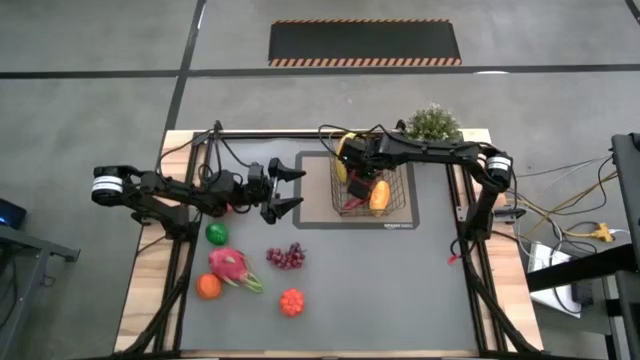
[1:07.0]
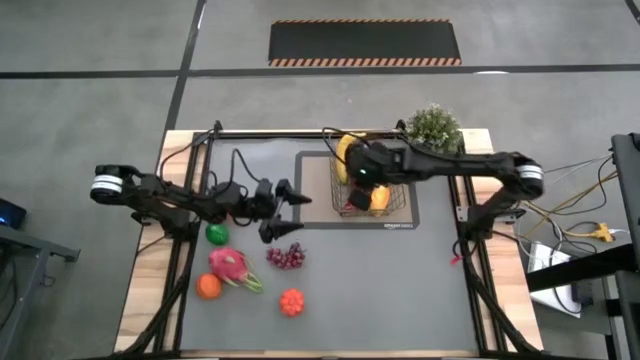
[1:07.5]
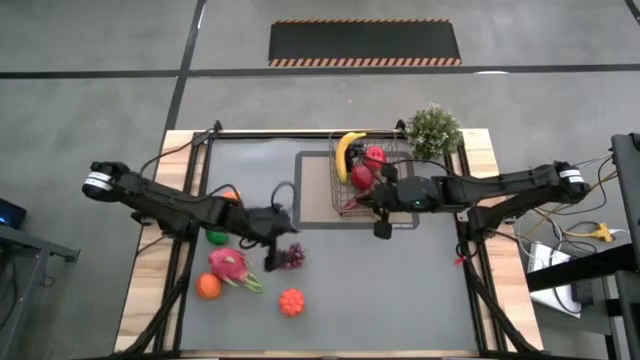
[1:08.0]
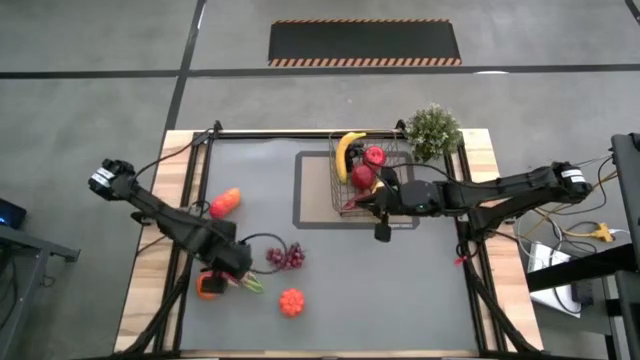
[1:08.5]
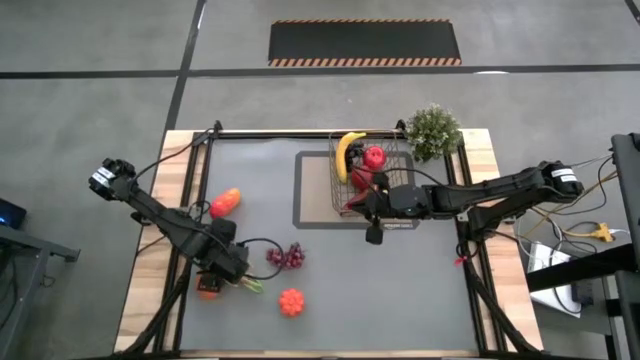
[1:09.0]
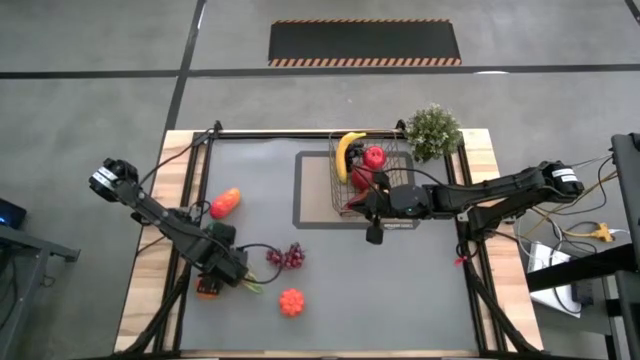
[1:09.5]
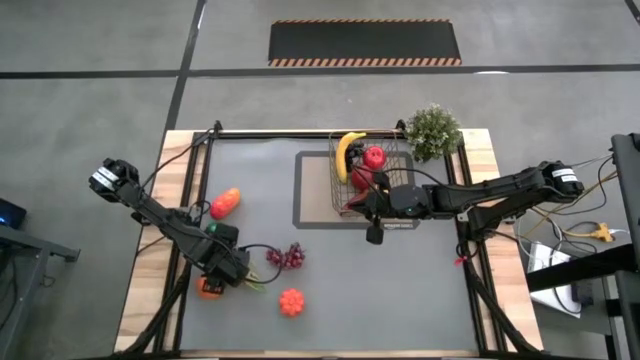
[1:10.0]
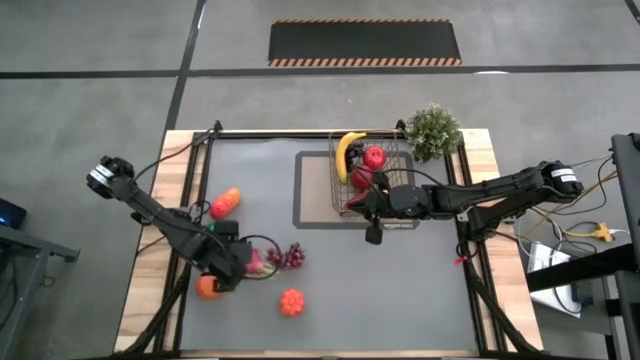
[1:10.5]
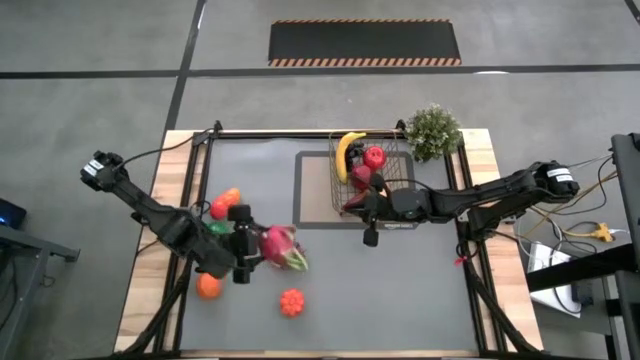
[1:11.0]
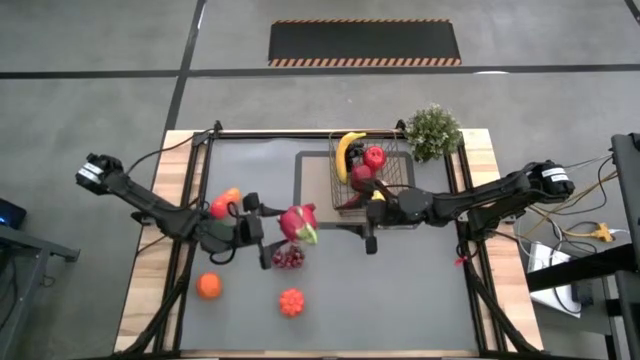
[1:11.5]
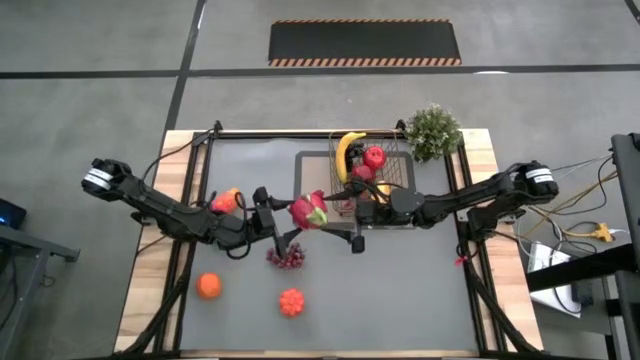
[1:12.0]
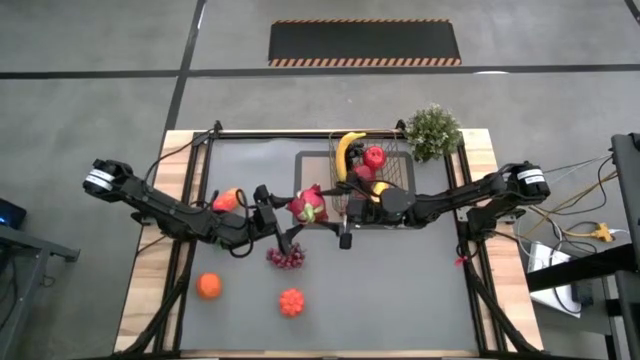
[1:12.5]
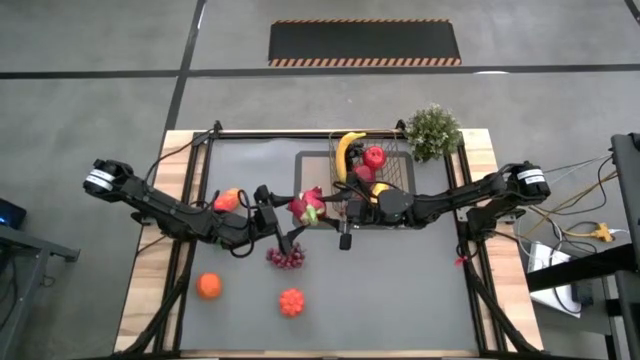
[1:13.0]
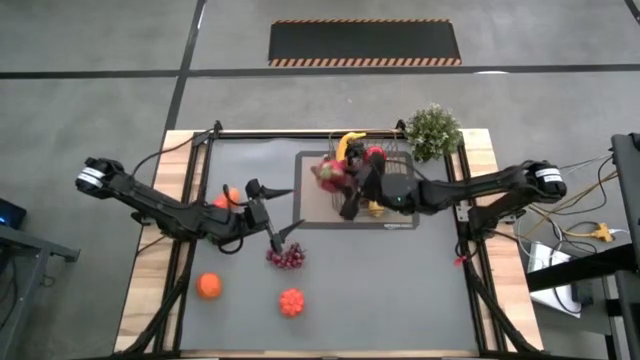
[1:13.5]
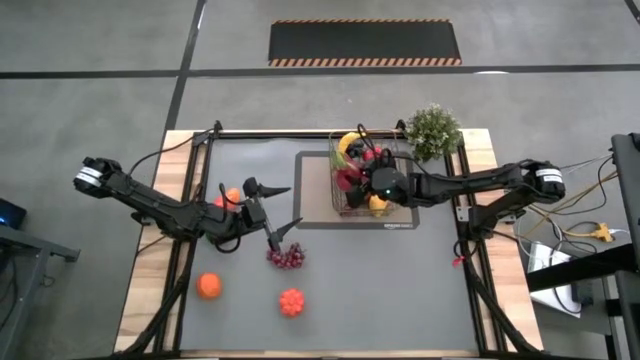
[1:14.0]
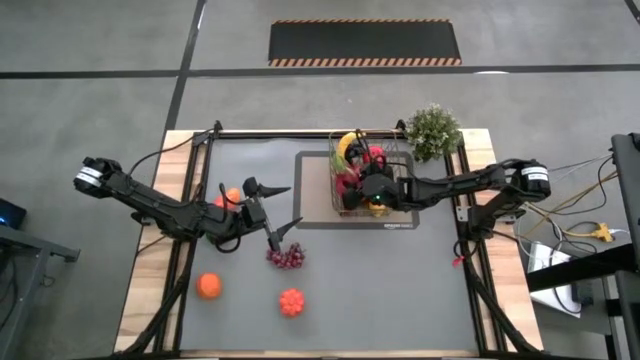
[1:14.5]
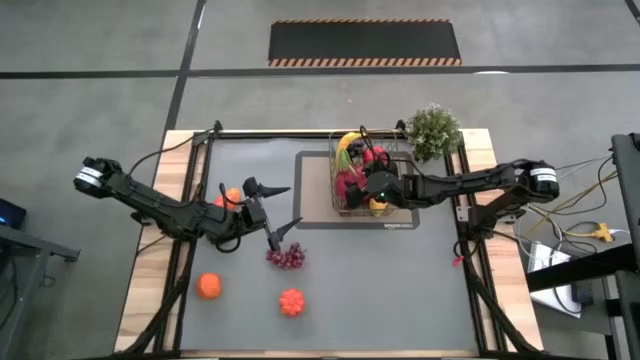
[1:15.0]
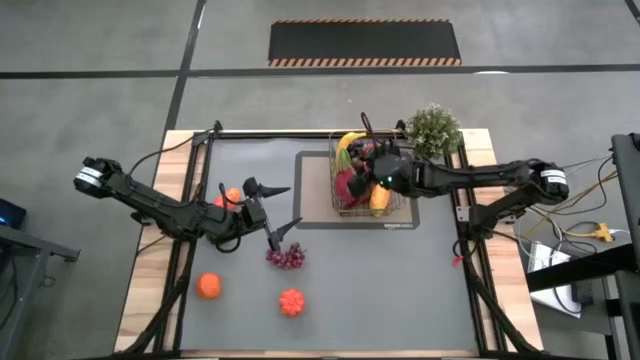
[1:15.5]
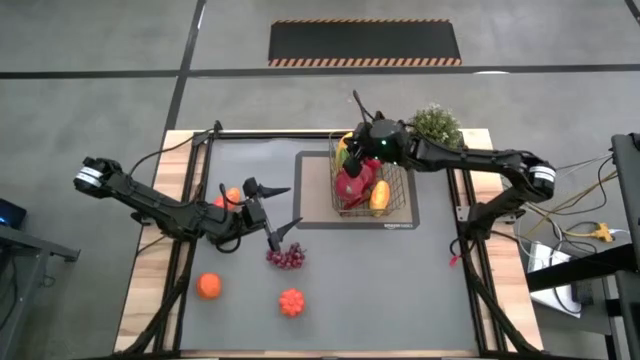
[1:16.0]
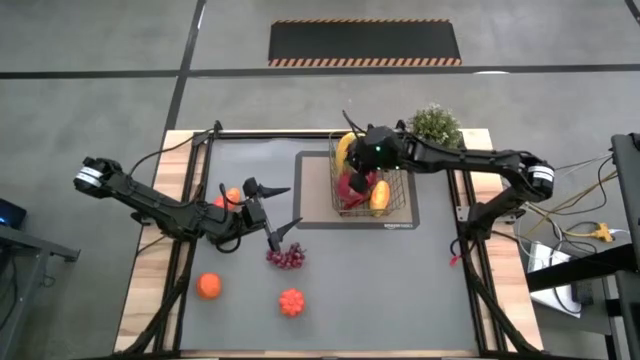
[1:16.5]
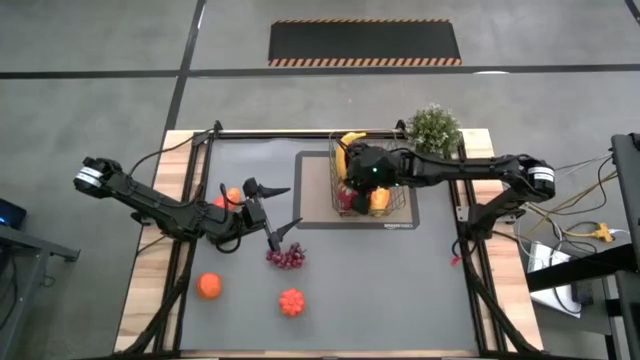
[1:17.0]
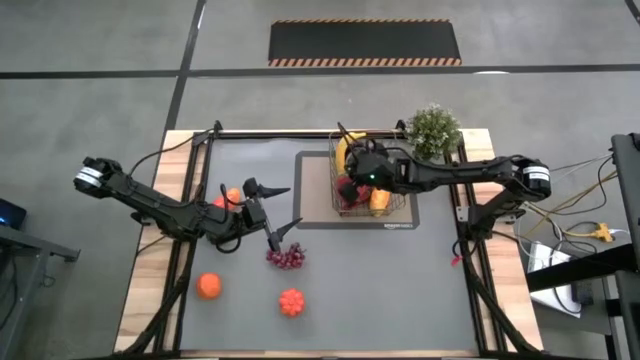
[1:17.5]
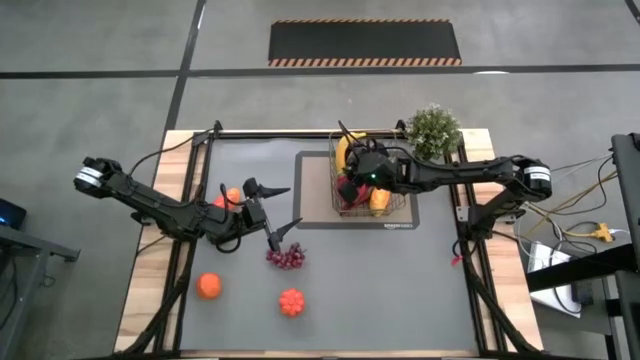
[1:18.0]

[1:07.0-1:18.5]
Task: Build produce basket
Put the dragonfruit into the wire basket

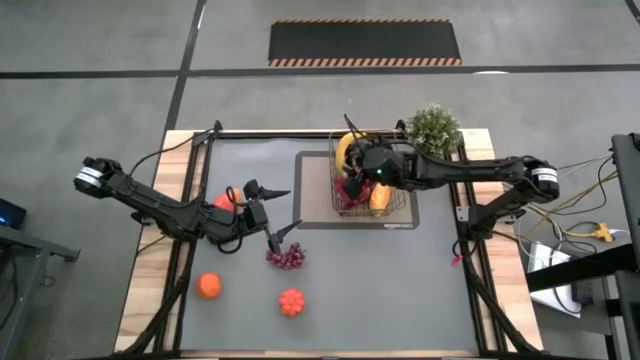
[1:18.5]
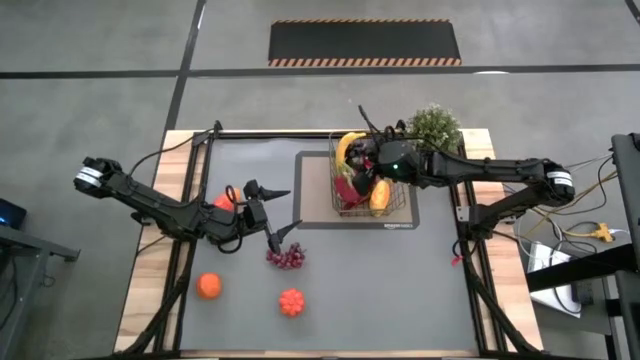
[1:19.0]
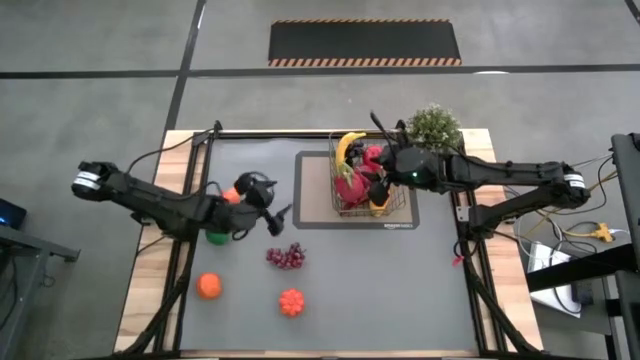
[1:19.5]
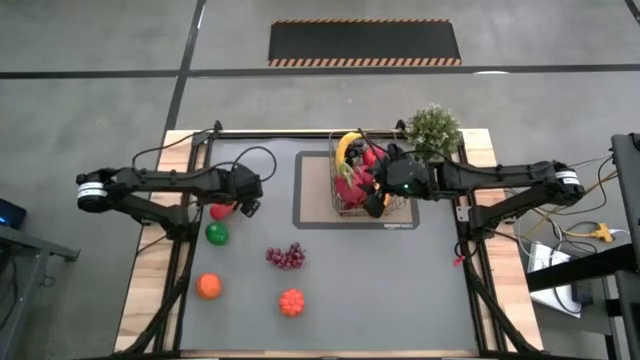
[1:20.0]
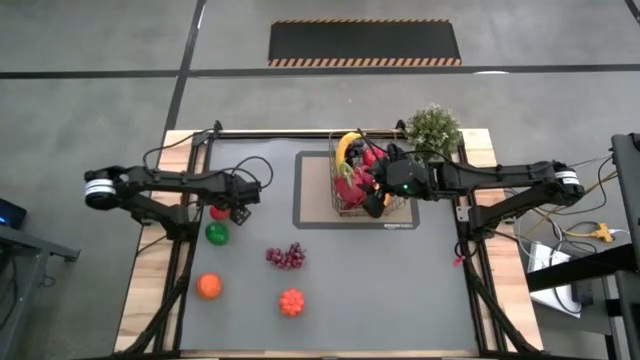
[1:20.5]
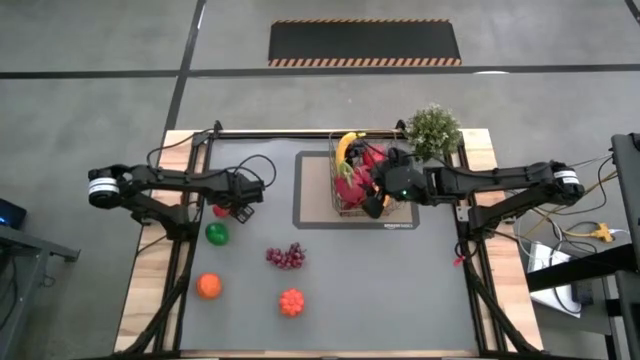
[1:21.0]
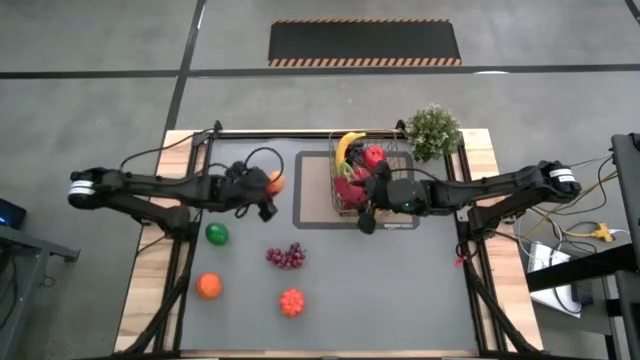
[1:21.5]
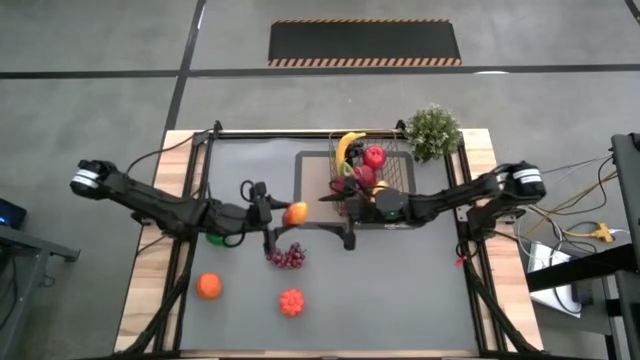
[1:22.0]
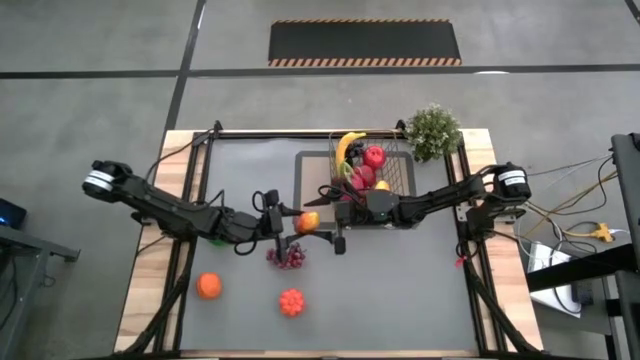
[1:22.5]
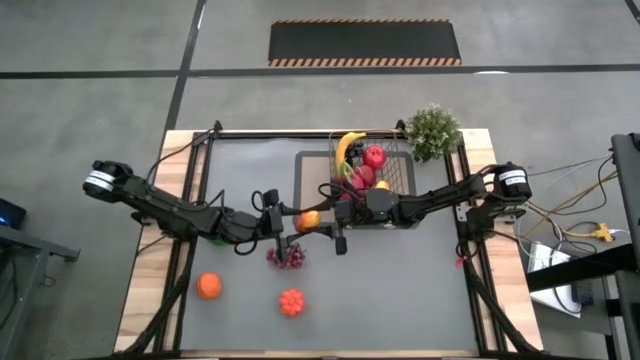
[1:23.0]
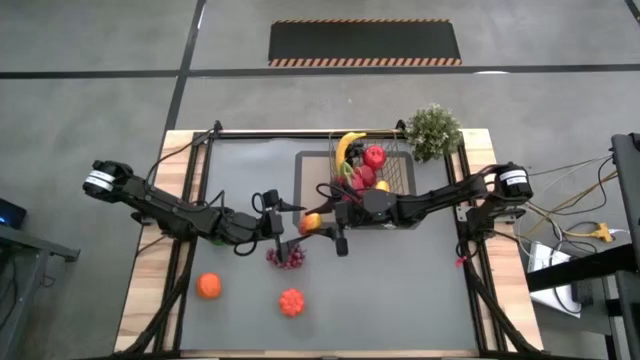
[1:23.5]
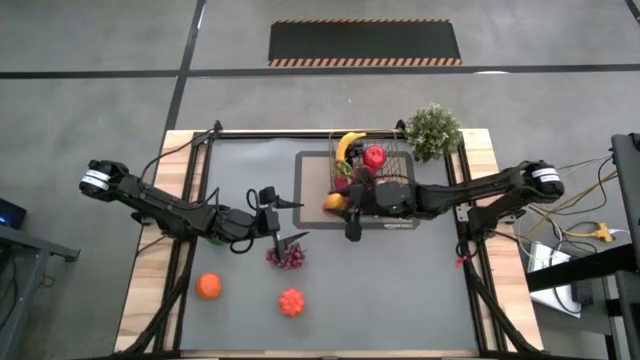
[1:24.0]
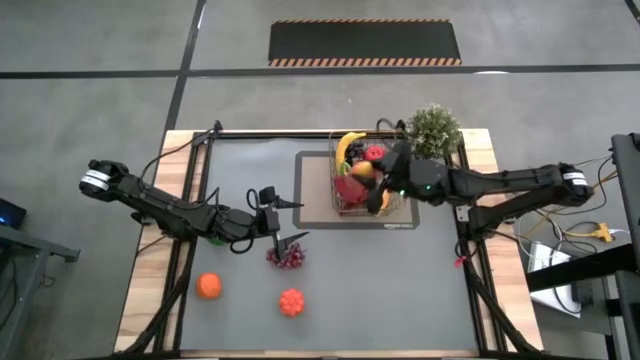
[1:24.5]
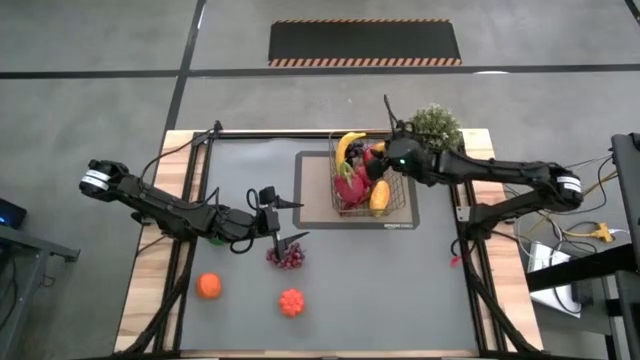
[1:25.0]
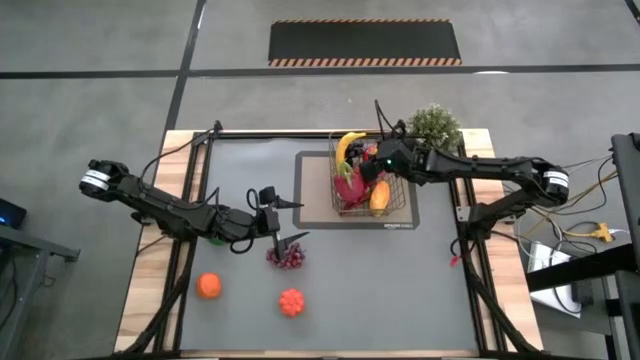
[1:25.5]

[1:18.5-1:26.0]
Put the mango into the wire basket

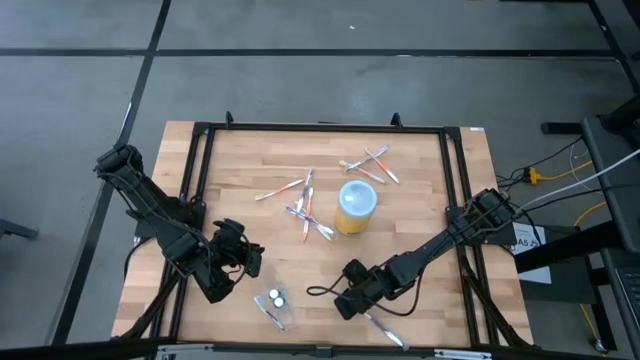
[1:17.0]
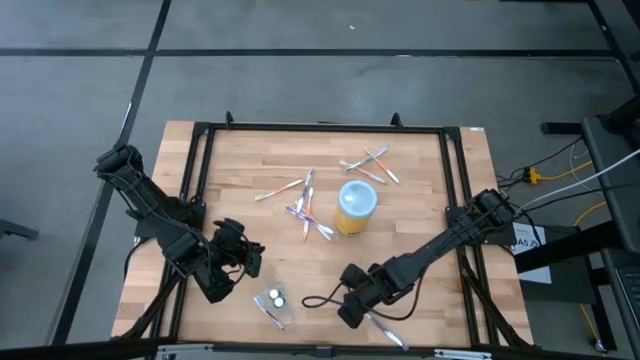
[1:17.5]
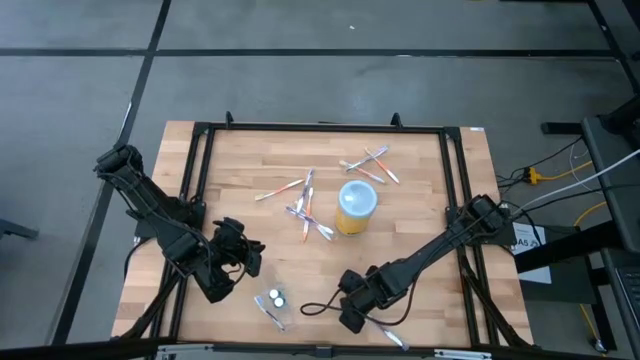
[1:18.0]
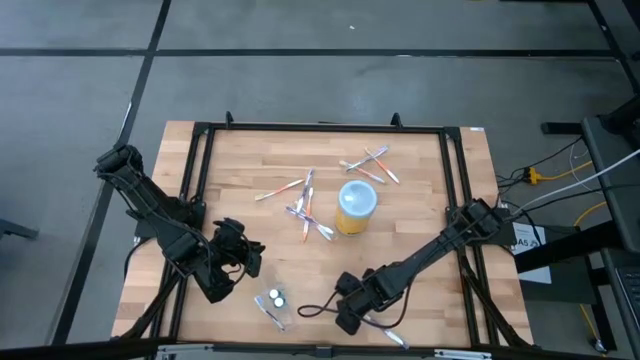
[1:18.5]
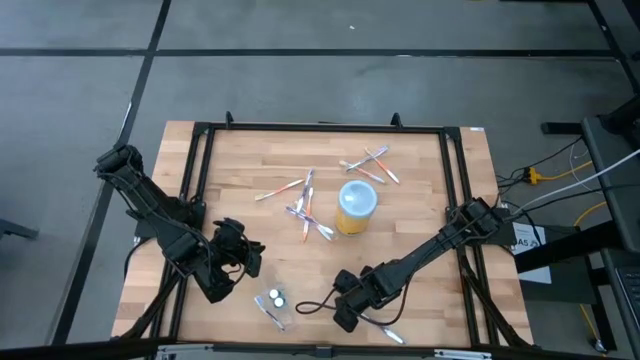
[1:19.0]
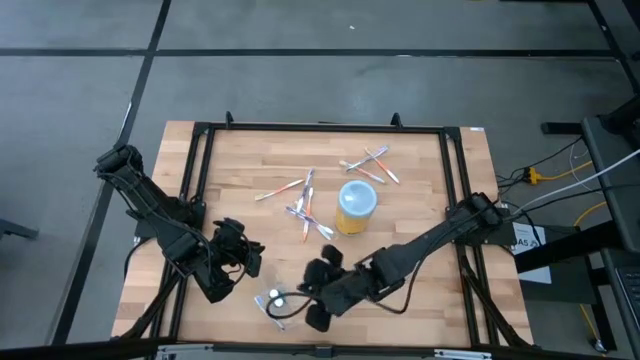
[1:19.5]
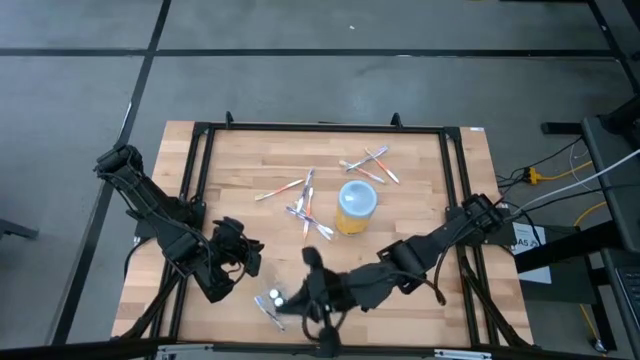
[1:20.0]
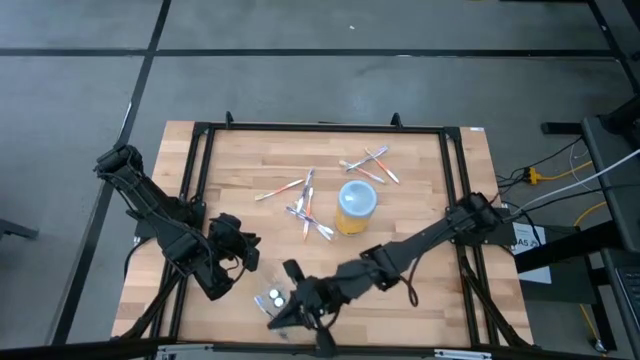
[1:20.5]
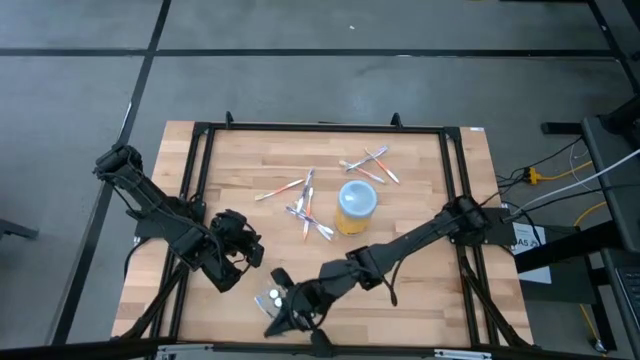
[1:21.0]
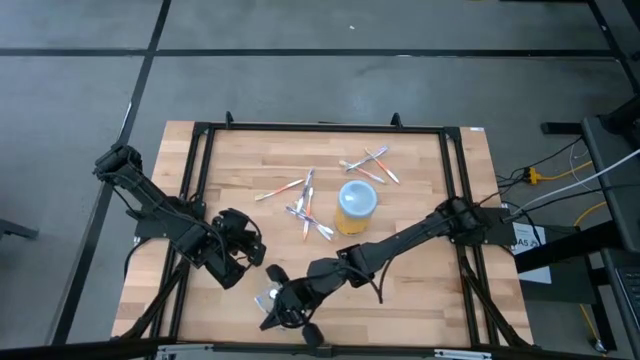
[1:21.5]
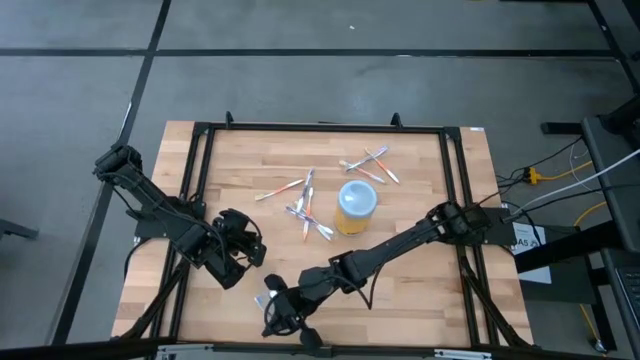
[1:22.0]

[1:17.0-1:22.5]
Task: Pick & Place toothbrushing station
Put the violet toothbrush into the right side of the transparent organizer
